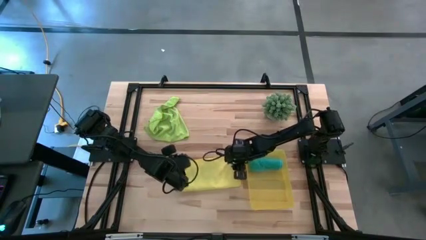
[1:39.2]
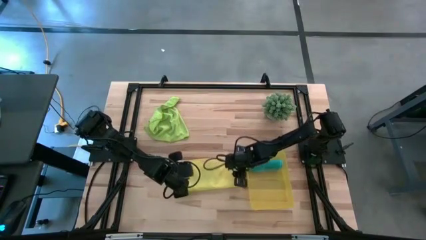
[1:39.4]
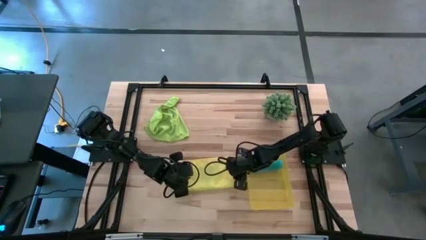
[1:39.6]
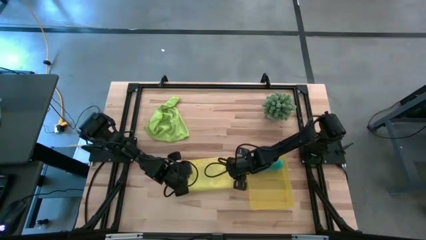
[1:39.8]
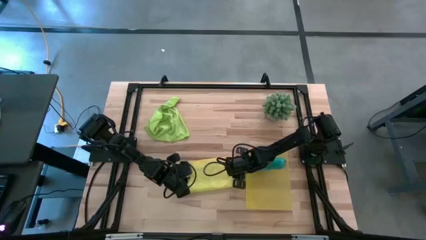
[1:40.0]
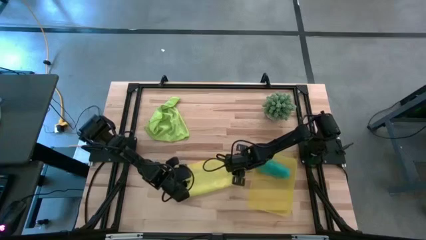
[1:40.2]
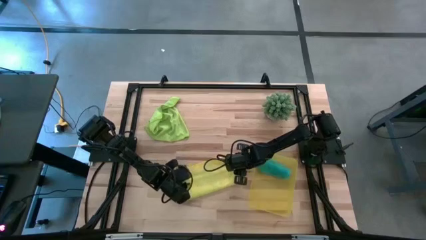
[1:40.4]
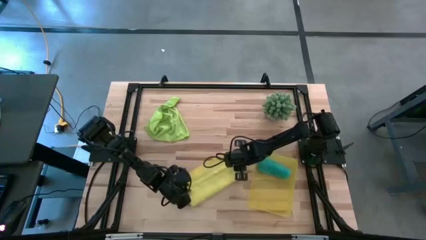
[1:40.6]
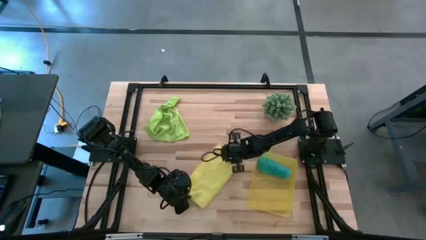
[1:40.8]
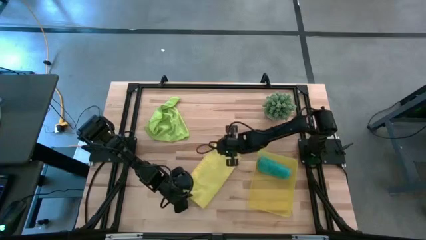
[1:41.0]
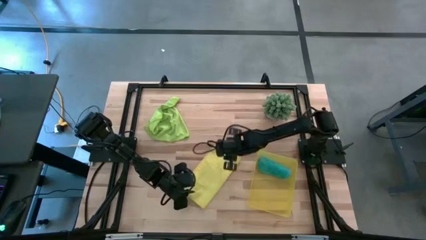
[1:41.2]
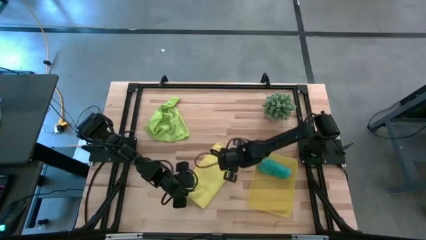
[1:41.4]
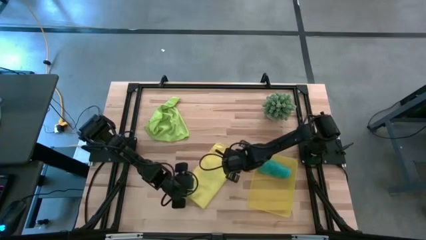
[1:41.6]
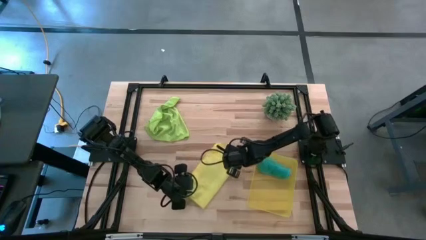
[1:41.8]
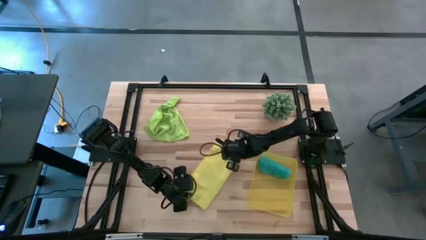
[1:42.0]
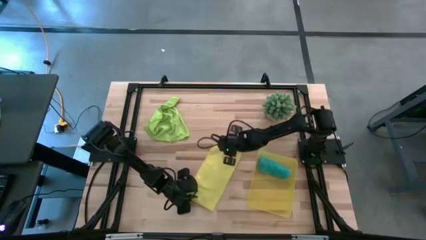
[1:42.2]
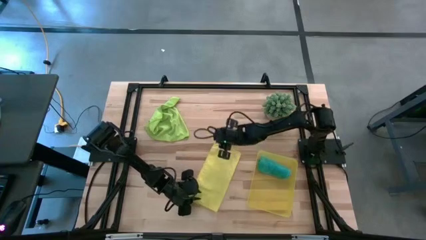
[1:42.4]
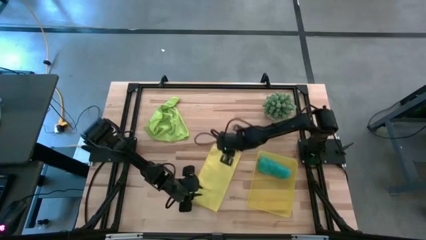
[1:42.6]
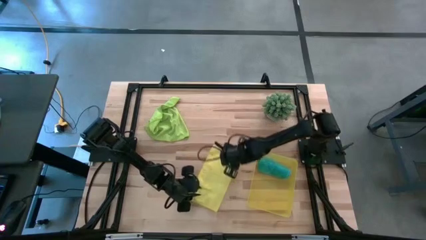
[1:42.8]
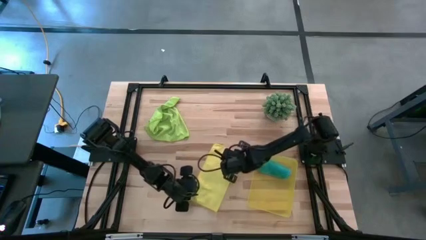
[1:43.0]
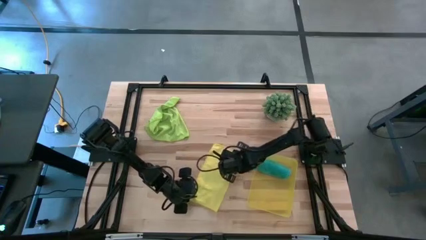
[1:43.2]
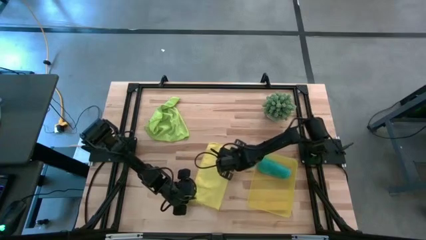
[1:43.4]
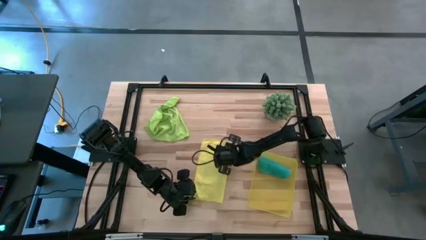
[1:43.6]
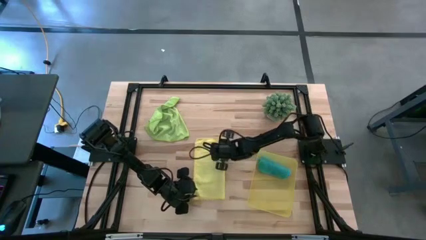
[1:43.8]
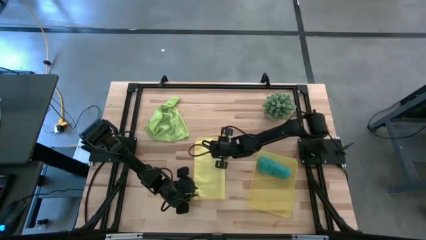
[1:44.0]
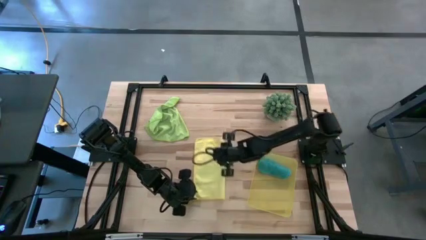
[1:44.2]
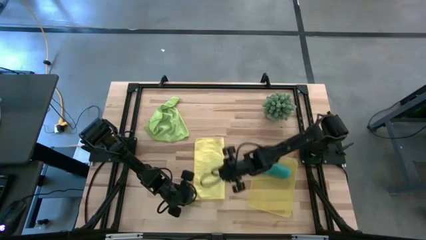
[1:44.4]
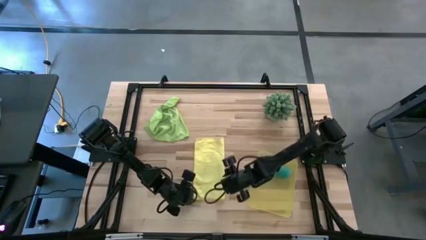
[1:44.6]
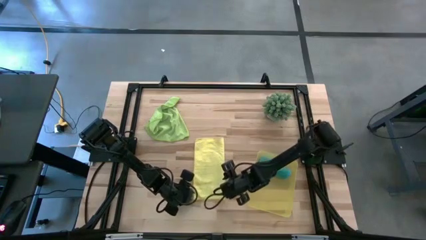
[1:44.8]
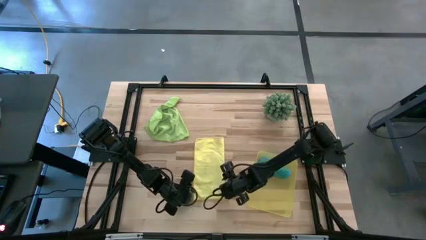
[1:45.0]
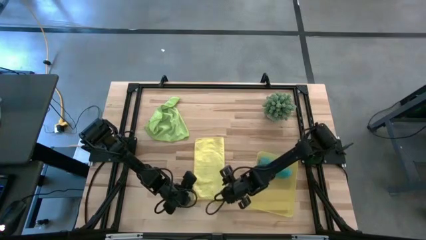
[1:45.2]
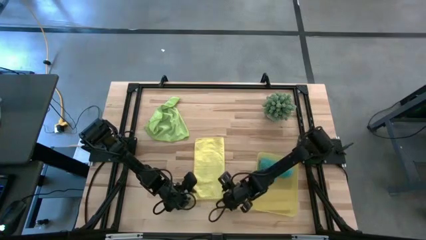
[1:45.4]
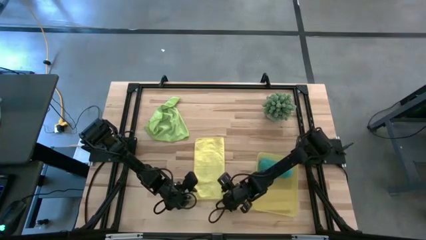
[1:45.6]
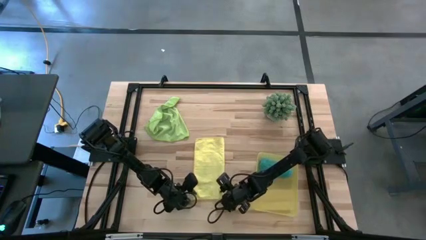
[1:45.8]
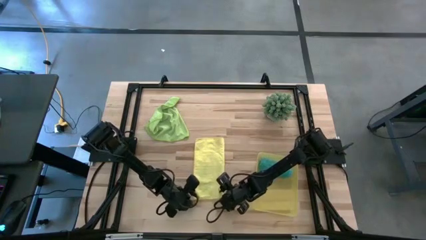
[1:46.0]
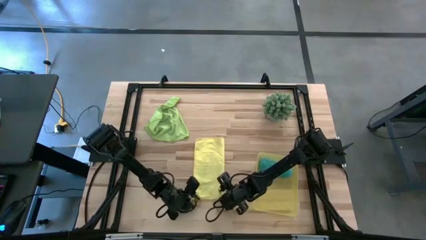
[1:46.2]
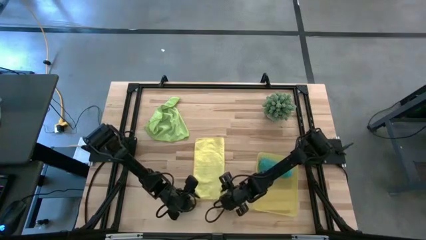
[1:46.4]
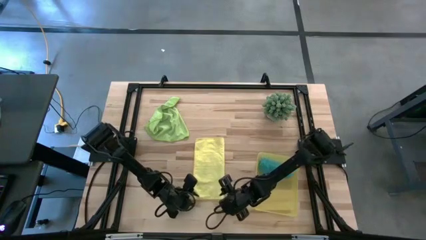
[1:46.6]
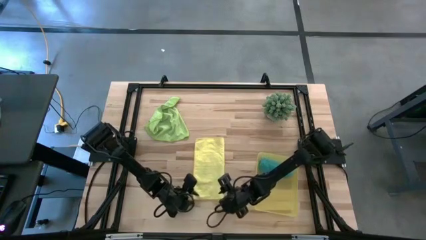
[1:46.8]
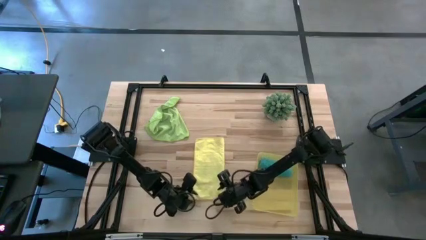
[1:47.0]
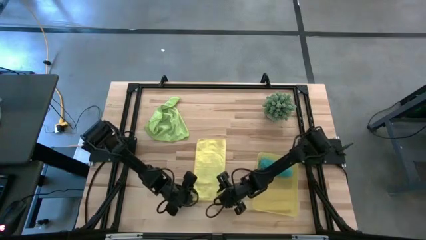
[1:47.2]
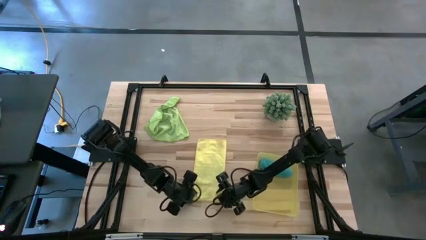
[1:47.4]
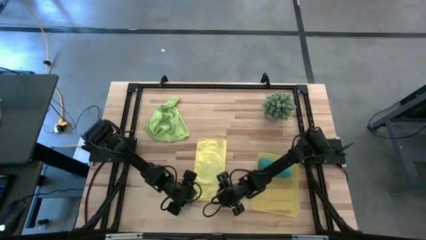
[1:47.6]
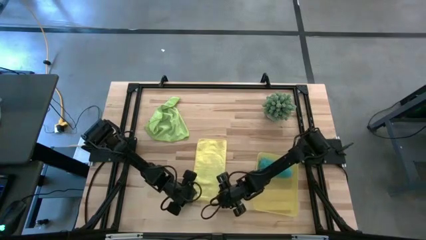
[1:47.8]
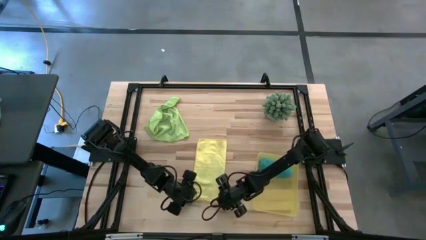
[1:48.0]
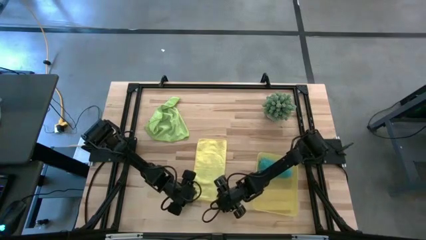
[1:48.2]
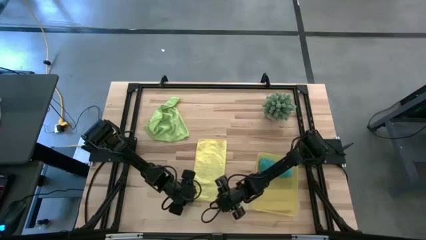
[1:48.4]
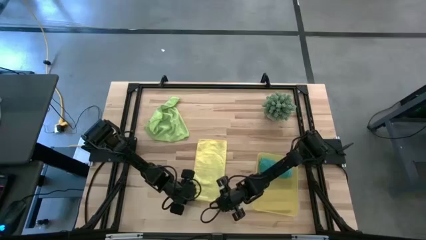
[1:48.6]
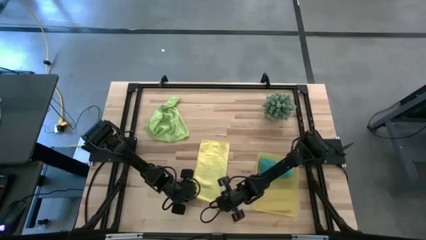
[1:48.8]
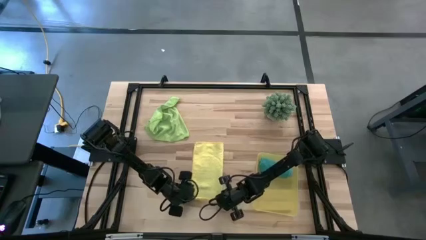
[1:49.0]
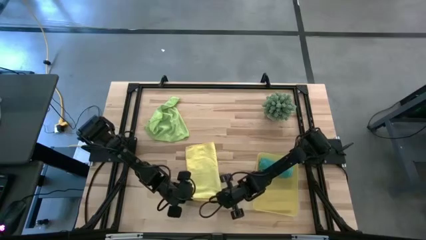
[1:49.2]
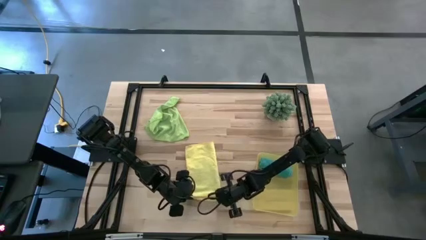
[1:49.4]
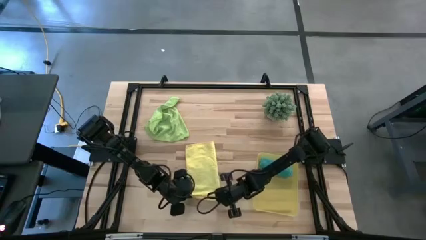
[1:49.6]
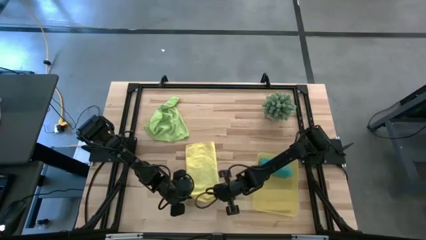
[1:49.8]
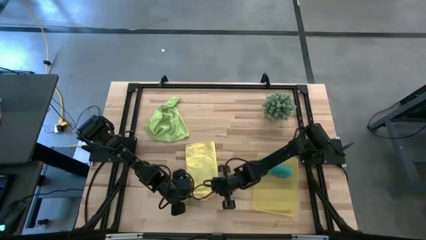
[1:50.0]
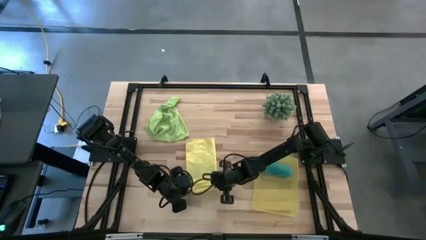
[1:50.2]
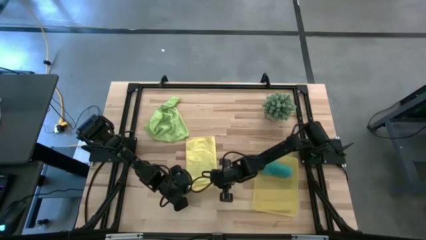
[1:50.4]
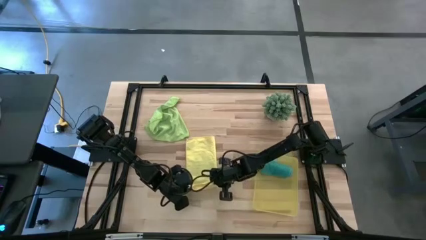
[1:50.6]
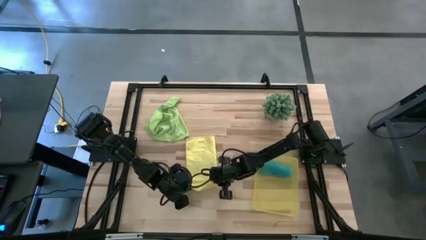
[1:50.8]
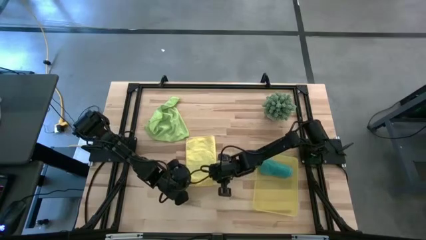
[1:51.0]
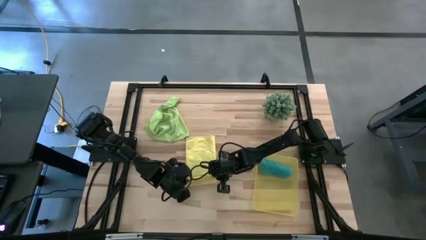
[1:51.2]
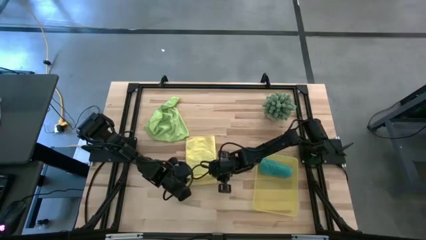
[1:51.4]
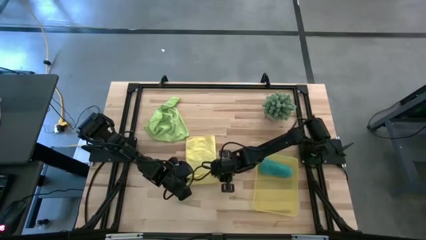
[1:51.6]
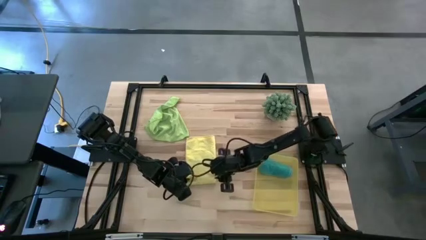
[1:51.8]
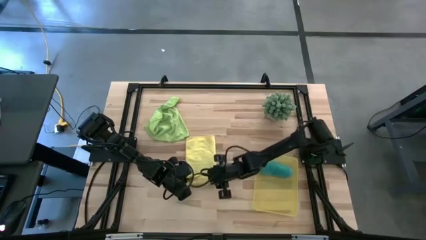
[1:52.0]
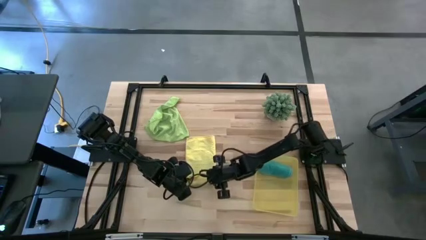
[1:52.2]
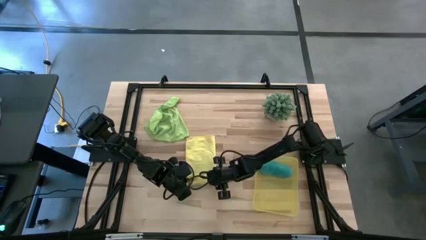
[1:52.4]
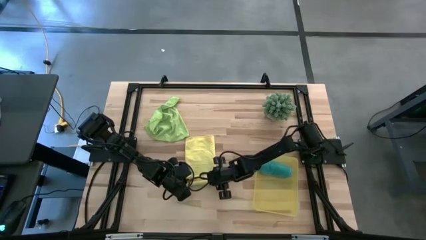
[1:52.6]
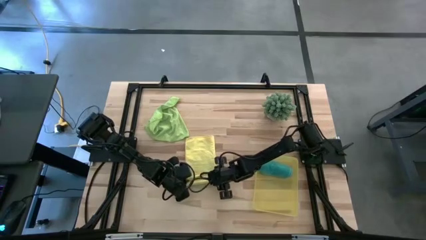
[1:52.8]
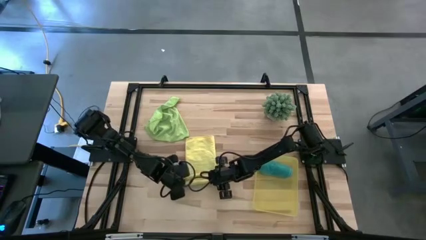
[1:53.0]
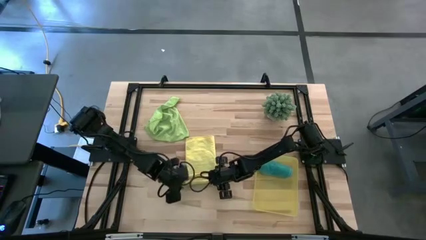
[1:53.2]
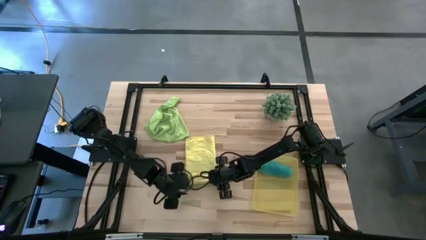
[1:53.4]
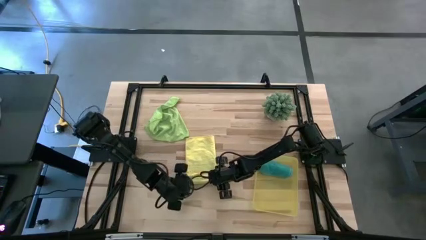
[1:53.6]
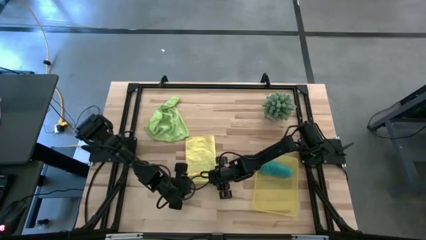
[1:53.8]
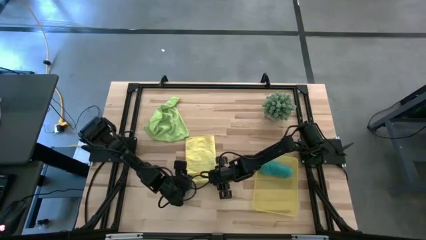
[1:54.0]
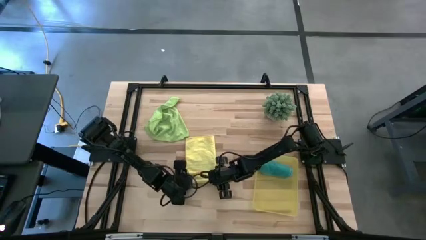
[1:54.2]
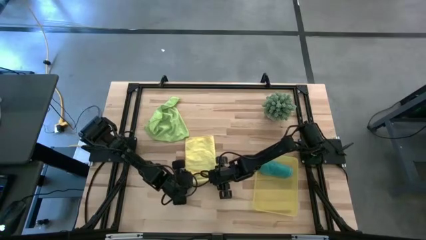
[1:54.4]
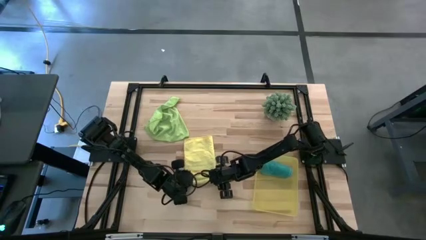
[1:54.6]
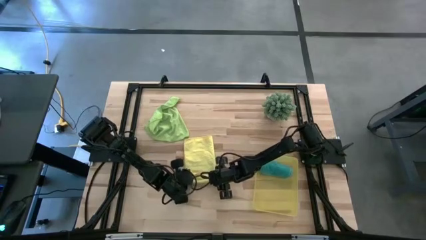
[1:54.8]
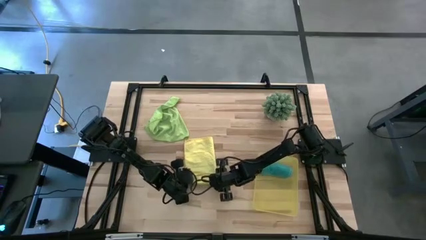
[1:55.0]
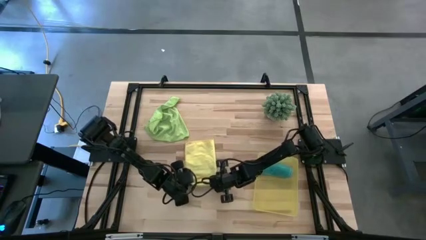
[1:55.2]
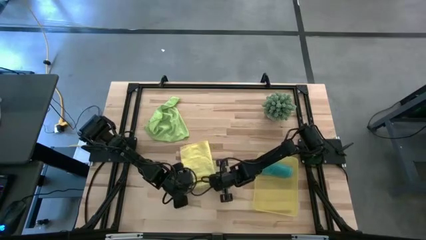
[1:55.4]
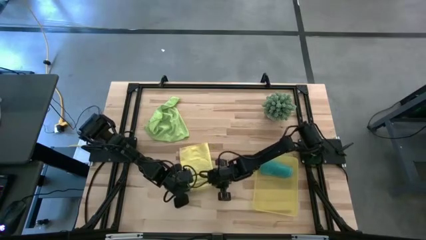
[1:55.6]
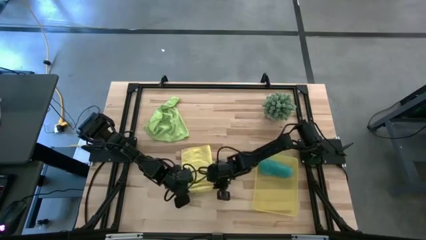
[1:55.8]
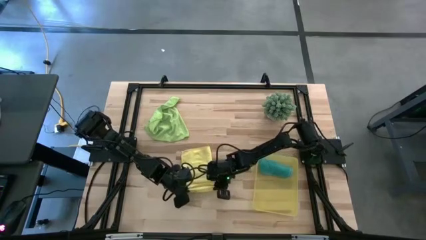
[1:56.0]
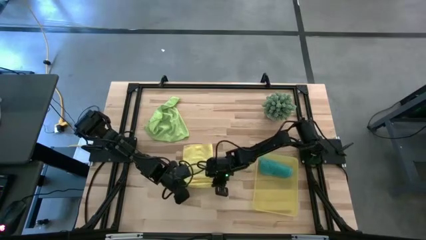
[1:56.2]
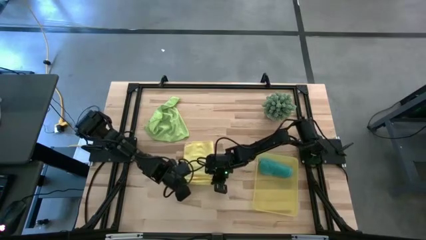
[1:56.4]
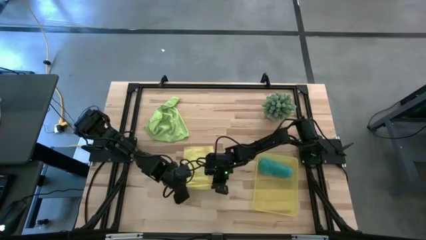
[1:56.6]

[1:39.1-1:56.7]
Task: Roll microfiber towels into tight, uniform cylinder then place into a basket
Roll the yellow microfiber cloth
